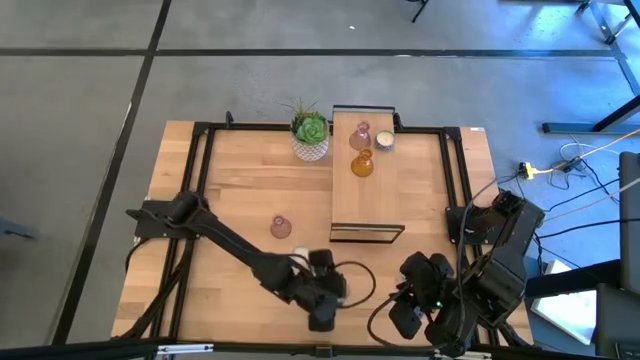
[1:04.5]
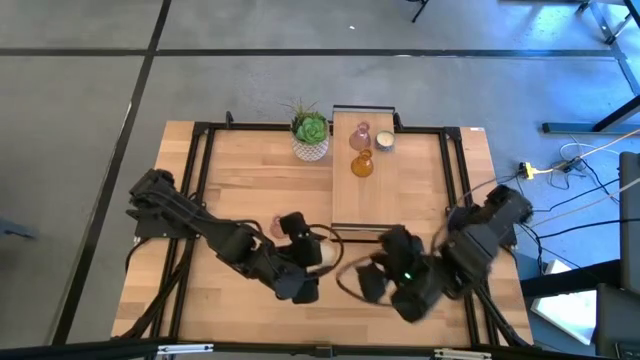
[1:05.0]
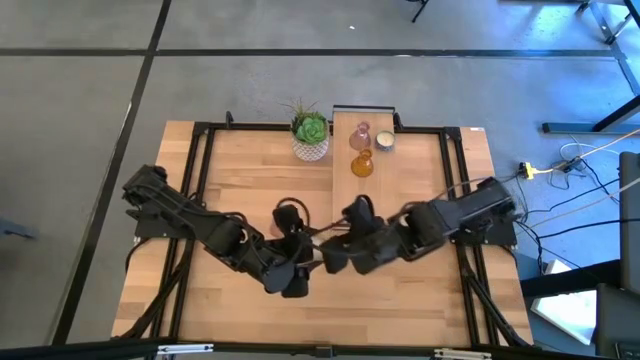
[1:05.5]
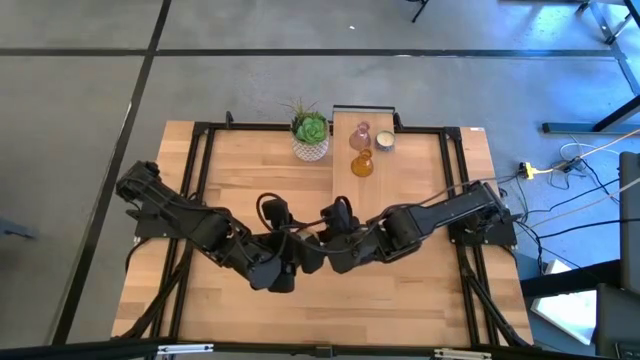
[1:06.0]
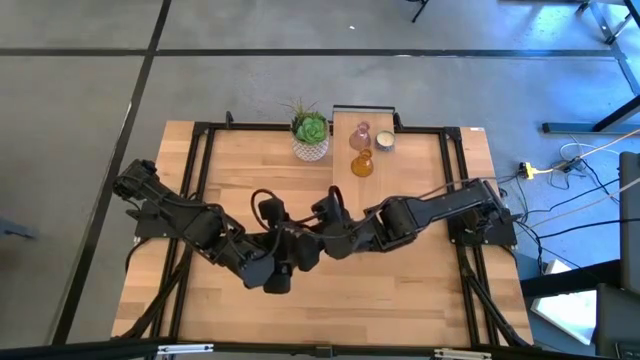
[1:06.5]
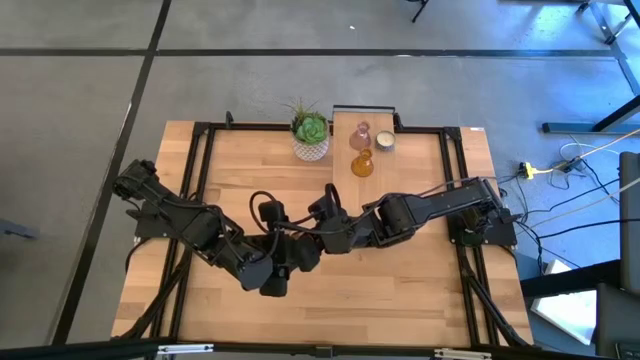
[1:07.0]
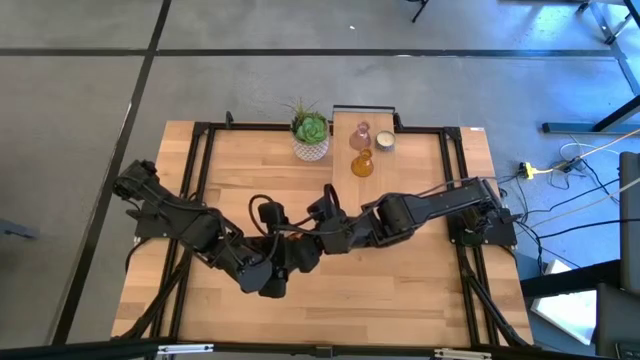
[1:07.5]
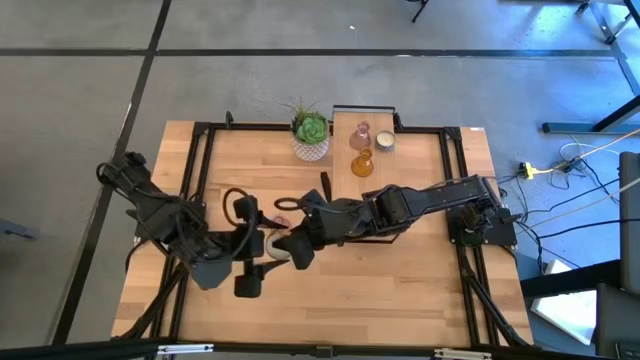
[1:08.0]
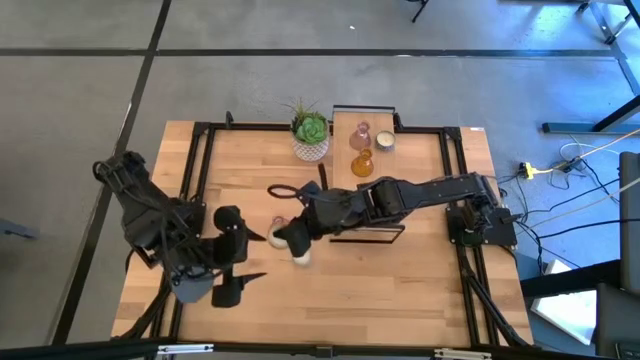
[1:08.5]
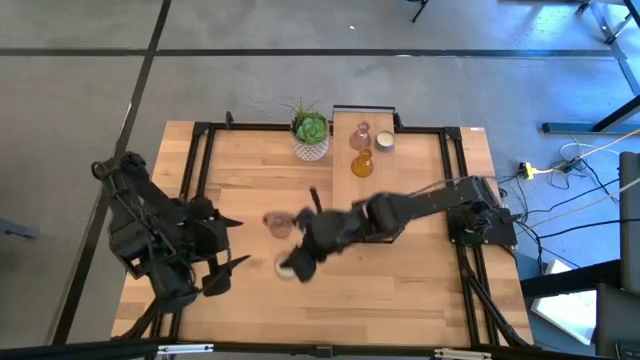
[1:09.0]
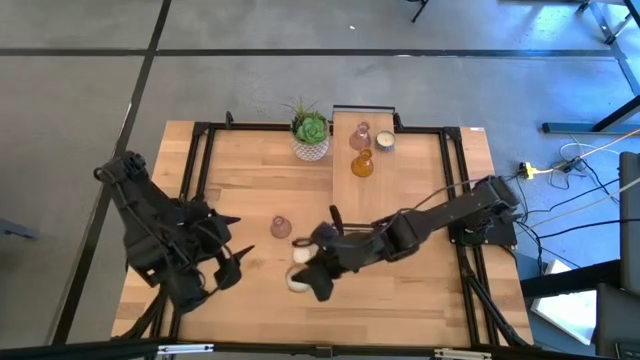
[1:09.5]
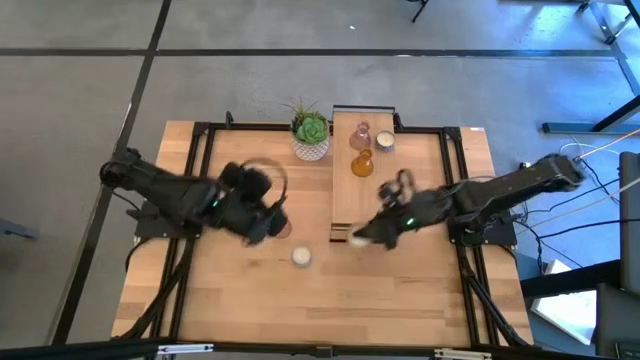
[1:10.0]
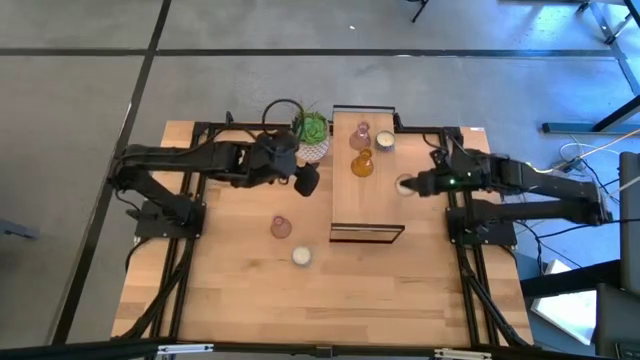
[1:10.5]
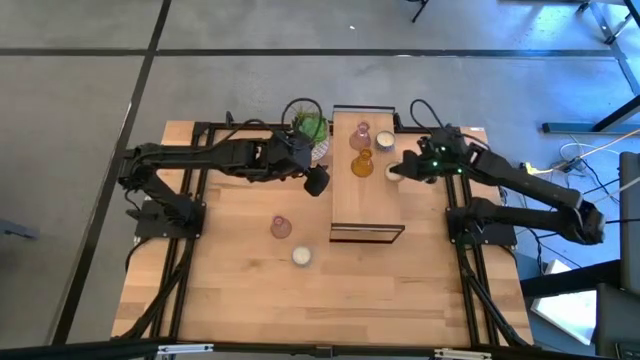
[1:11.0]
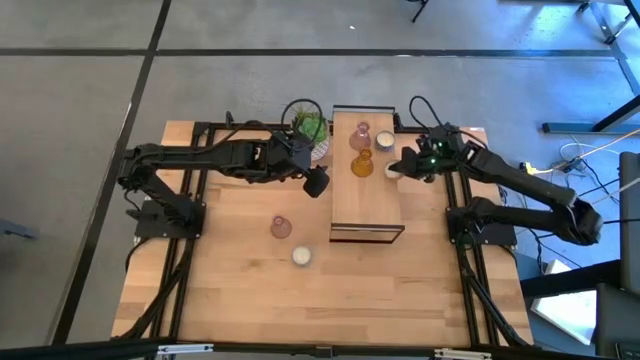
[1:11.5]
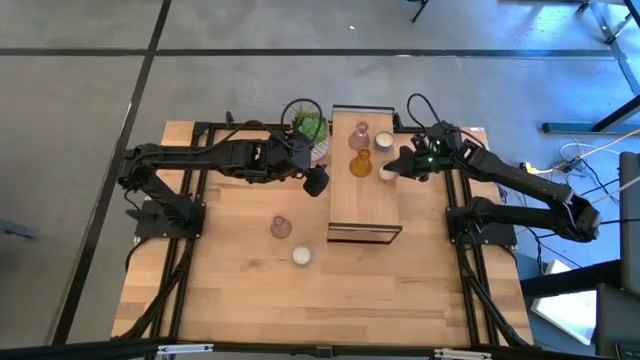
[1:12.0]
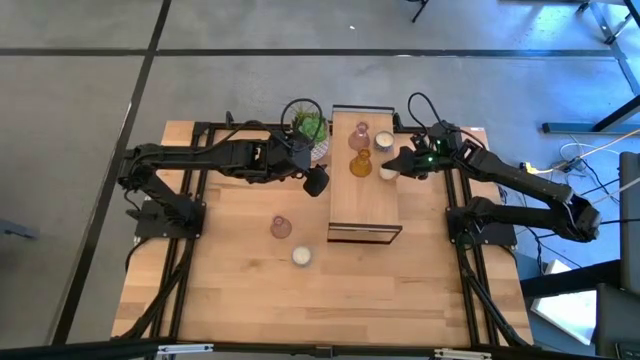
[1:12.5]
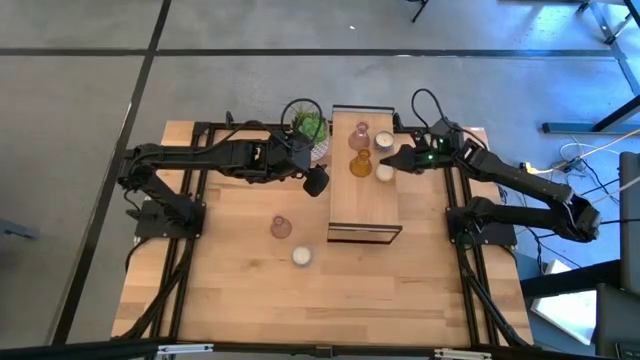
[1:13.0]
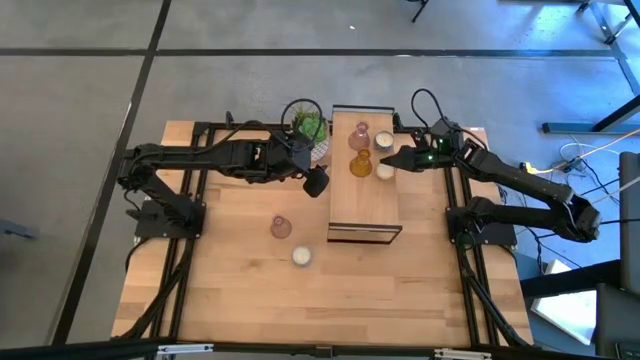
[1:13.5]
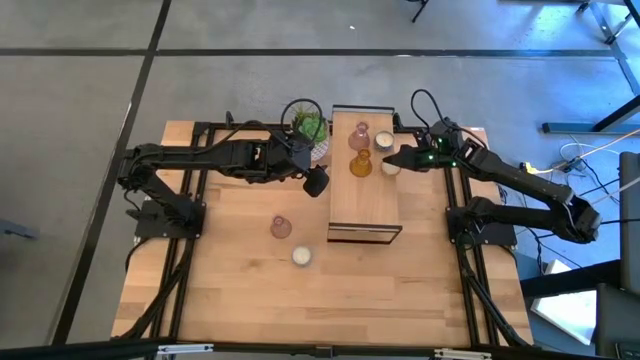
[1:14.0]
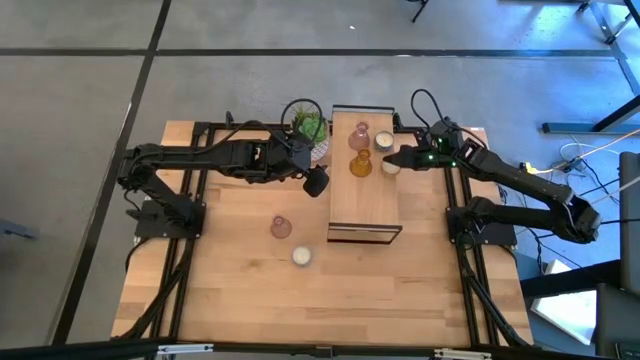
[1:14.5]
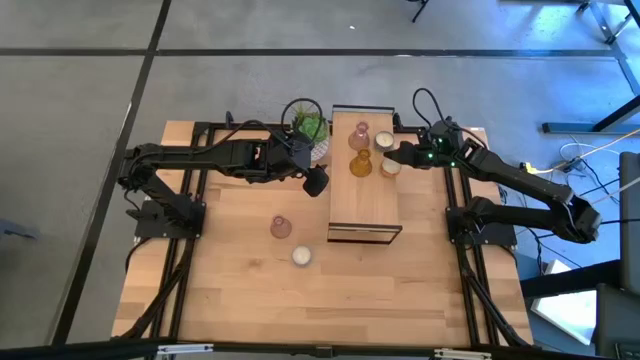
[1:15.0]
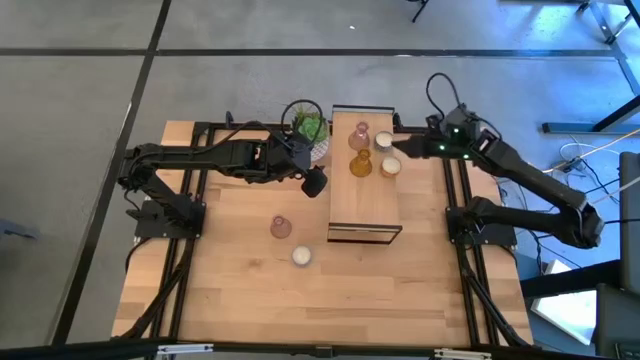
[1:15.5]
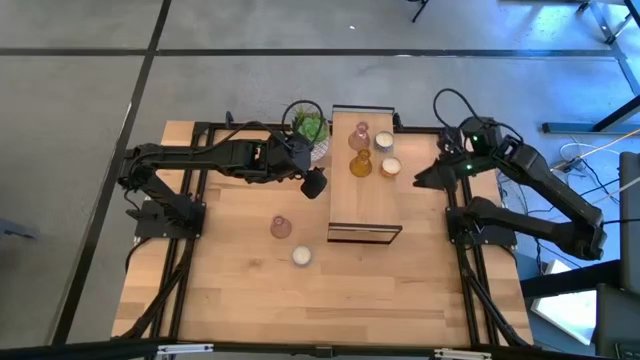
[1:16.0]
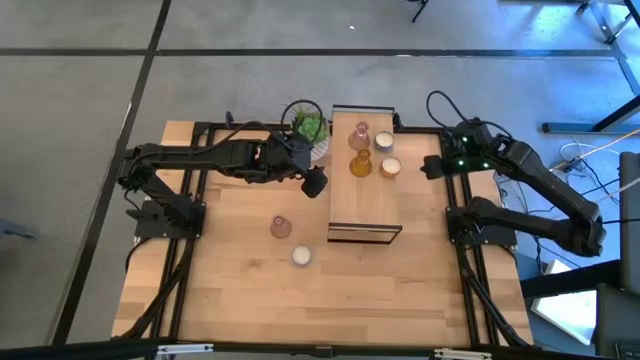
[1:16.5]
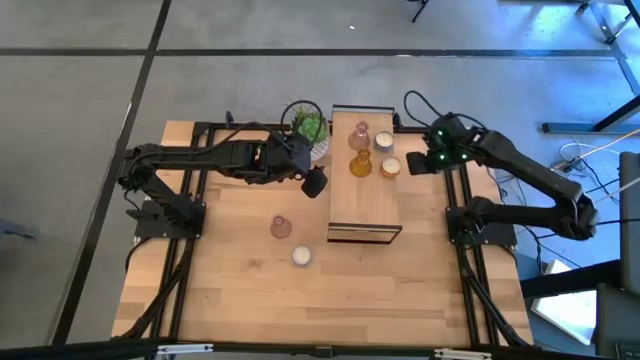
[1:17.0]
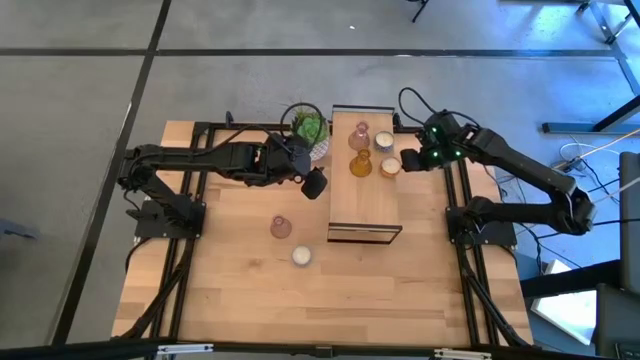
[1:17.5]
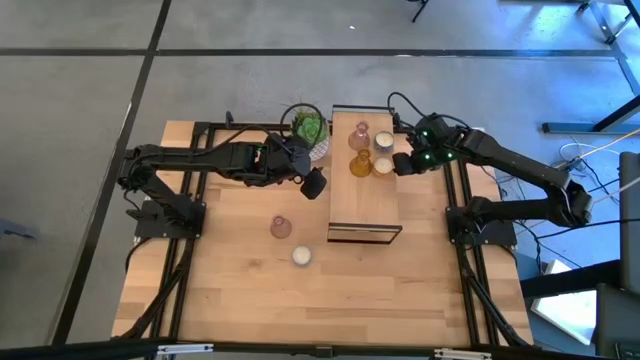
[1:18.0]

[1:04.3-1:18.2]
Task: Pick & Place candle stick holders
Put the patterned orange scented candle on the shelf aligned with the patterned blue scented candle

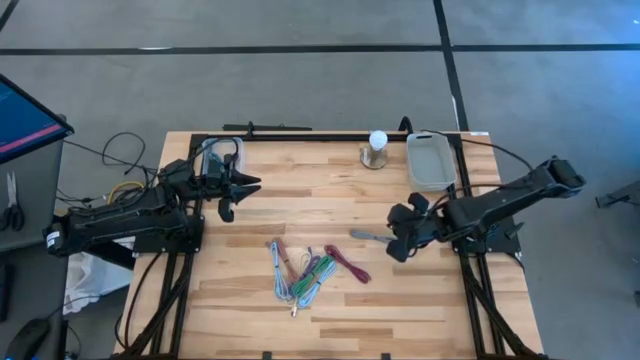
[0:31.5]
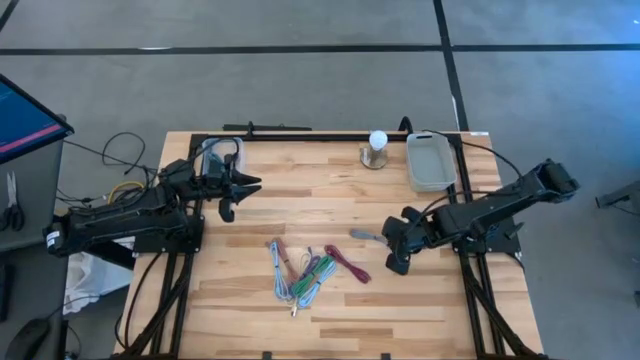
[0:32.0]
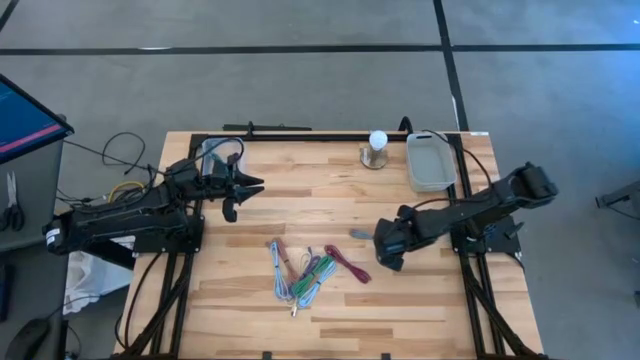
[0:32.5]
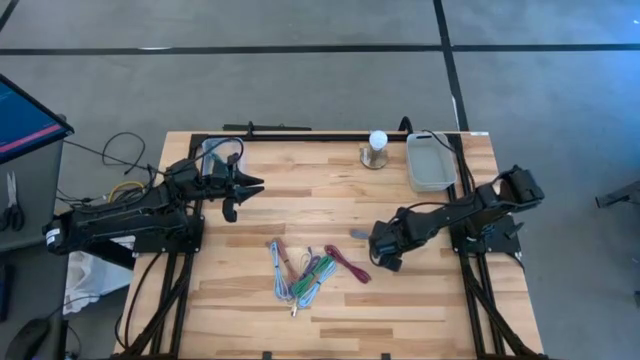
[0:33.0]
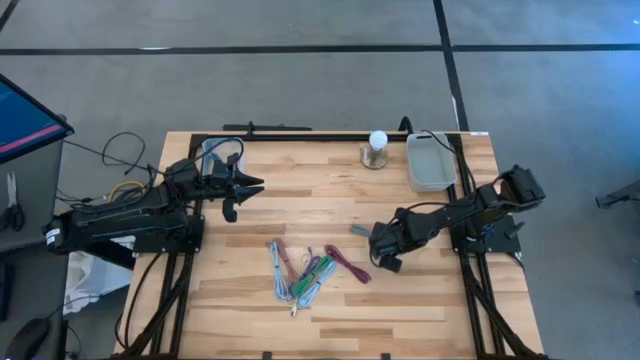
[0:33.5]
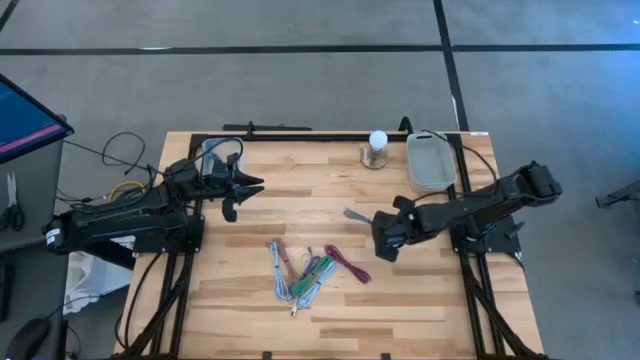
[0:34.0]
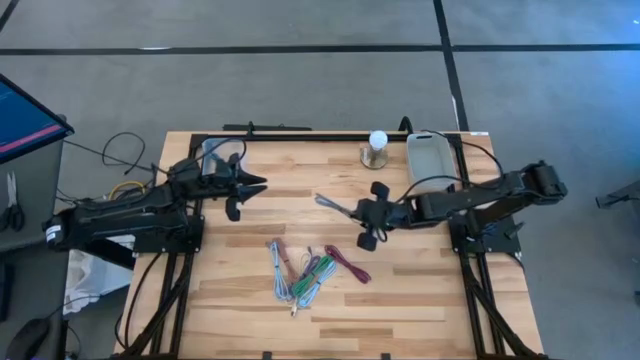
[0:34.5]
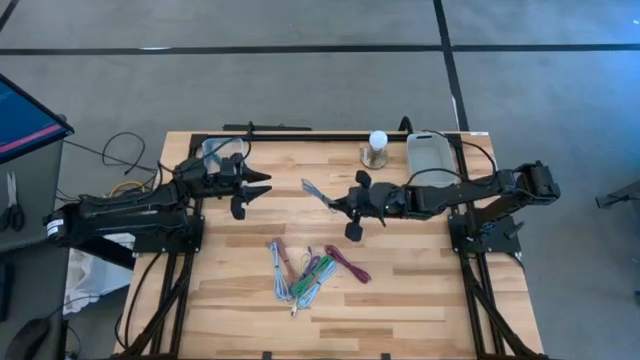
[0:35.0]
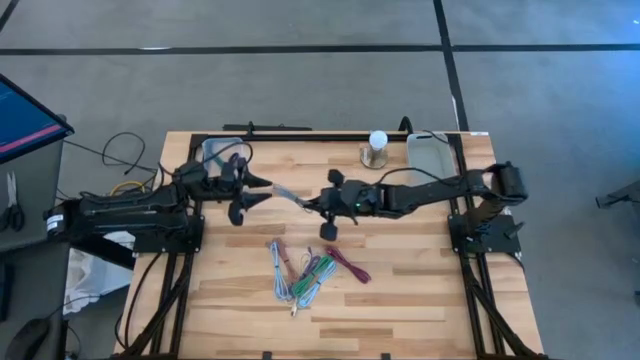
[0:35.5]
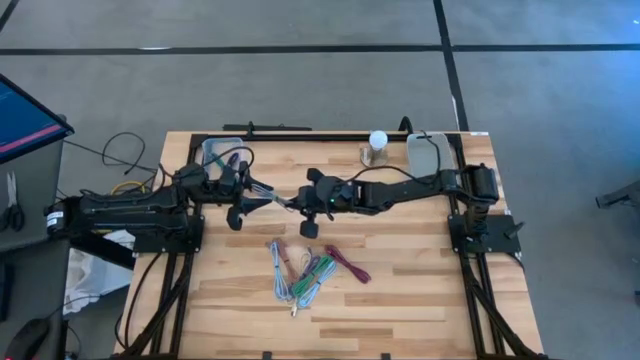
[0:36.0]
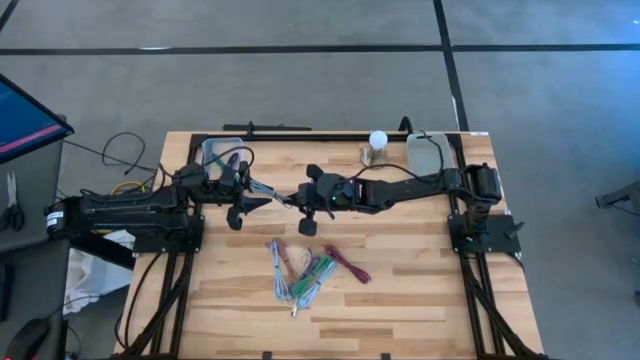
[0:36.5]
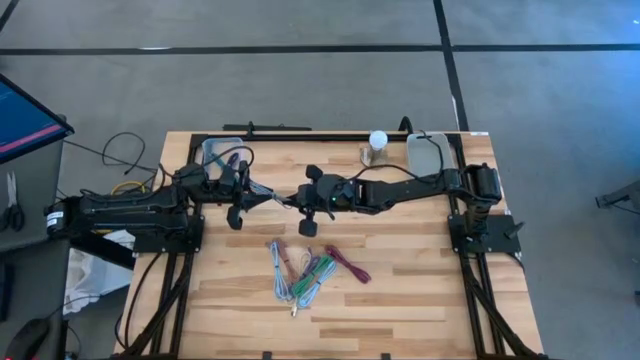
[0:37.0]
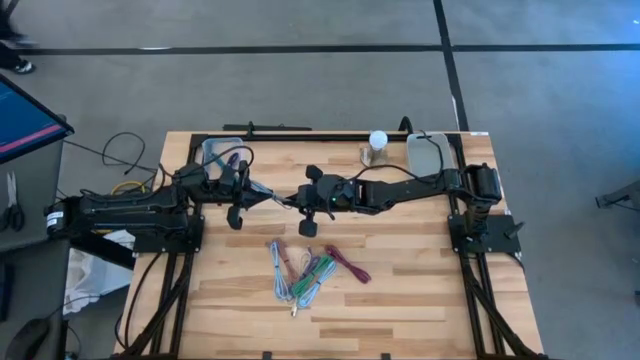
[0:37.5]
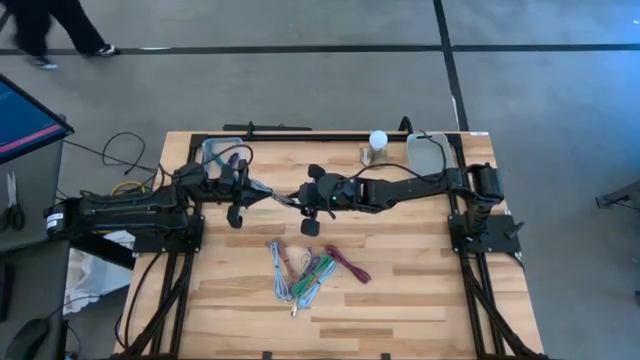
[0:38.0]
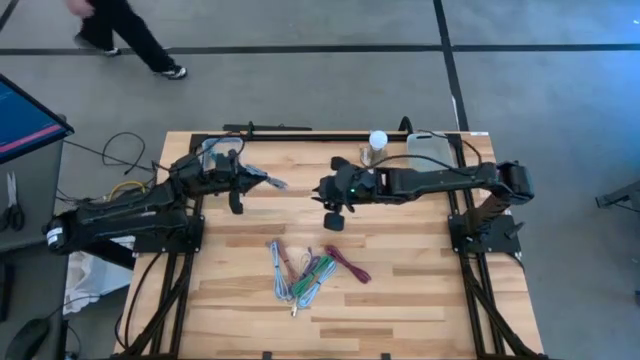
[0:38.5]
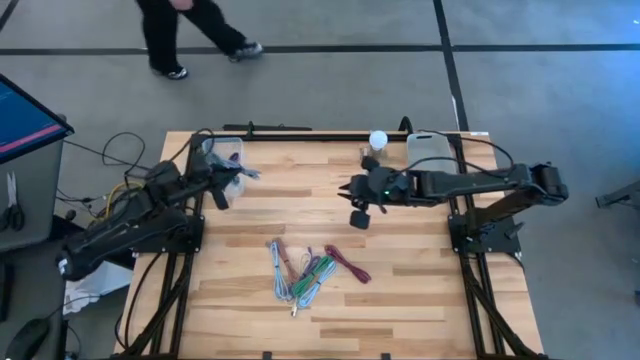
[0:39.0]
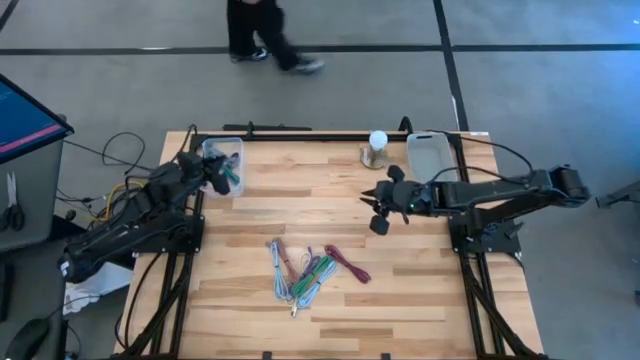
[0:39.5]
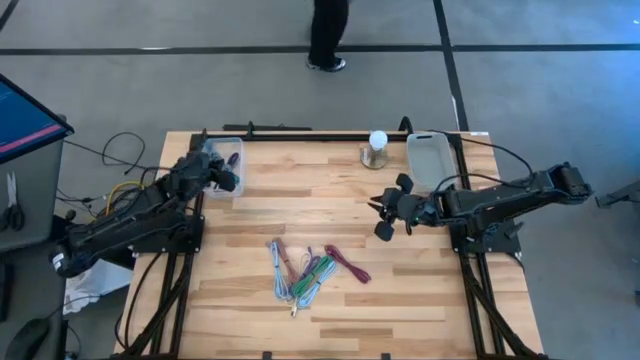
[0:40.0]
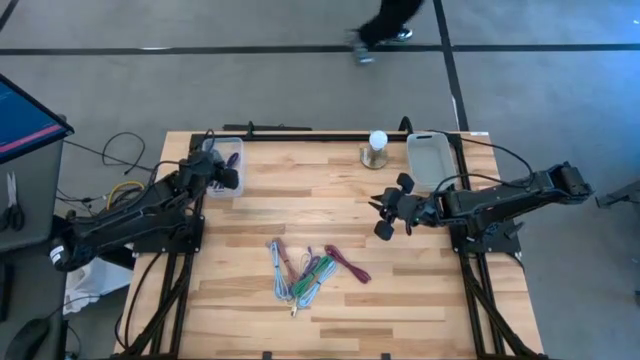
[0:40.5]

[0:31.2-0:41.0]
Task: Pick & Place USB Port
Put the white and black charger cable into the transparent bin
